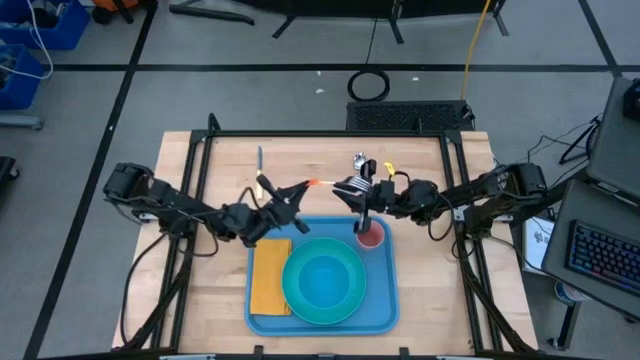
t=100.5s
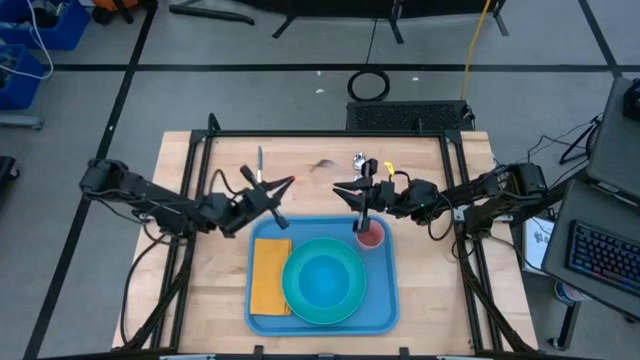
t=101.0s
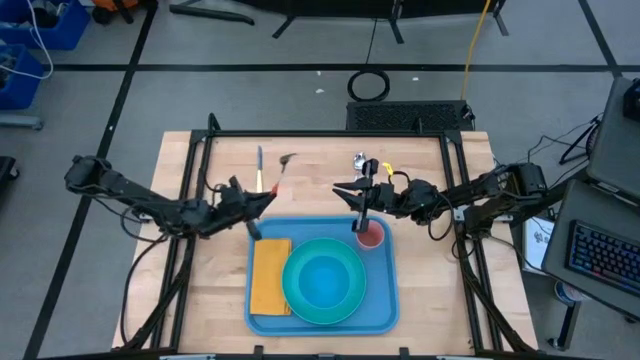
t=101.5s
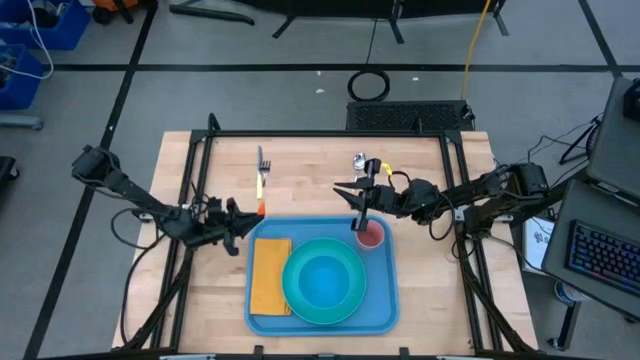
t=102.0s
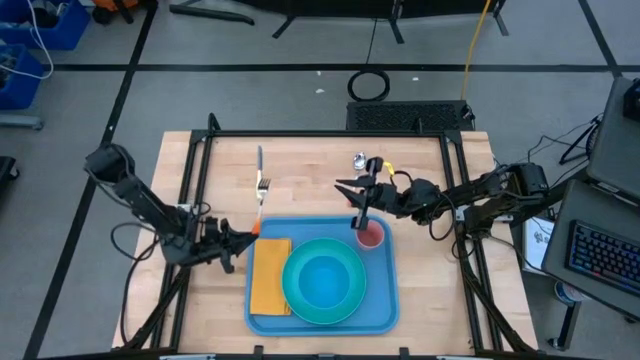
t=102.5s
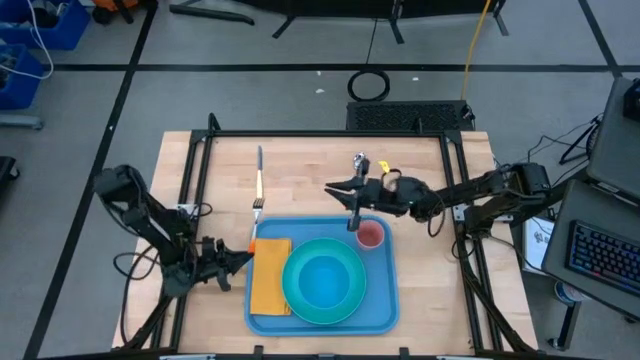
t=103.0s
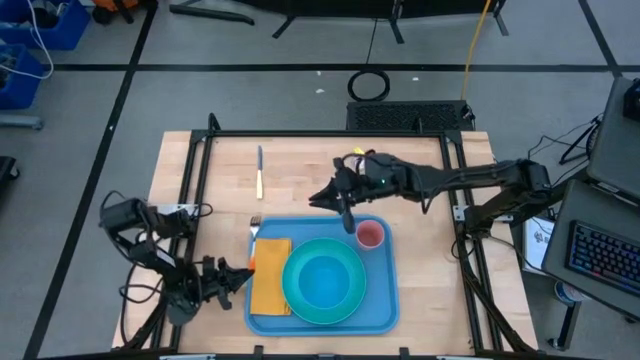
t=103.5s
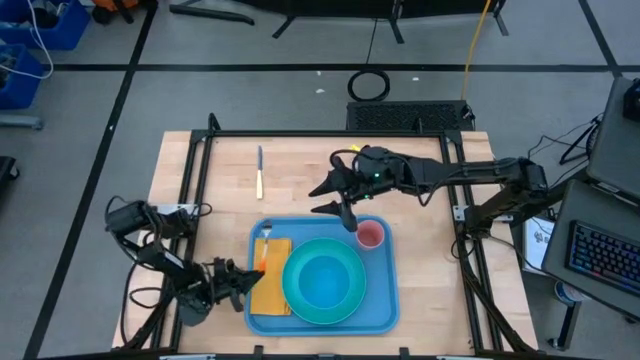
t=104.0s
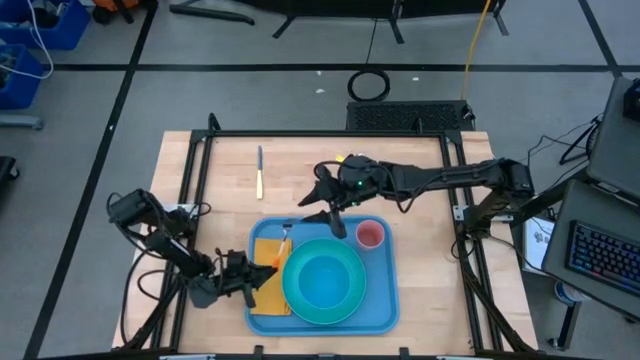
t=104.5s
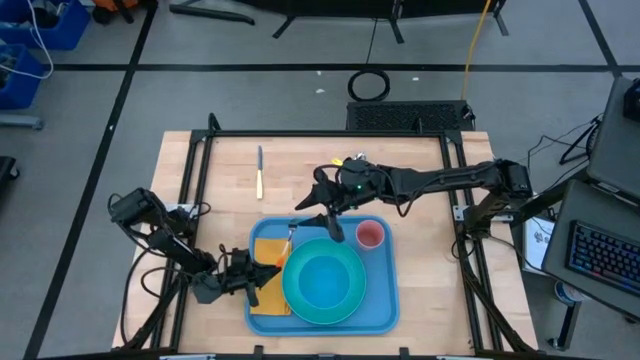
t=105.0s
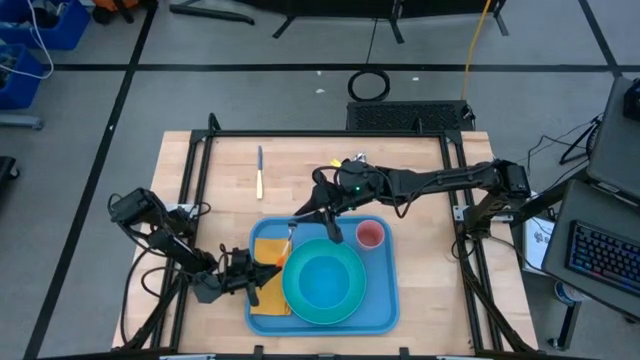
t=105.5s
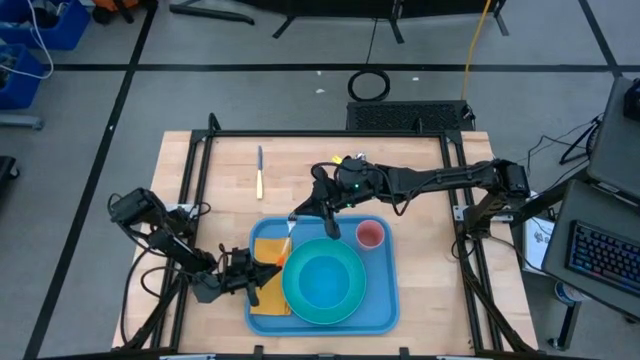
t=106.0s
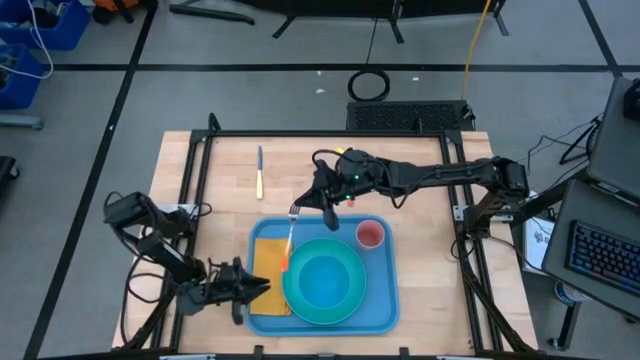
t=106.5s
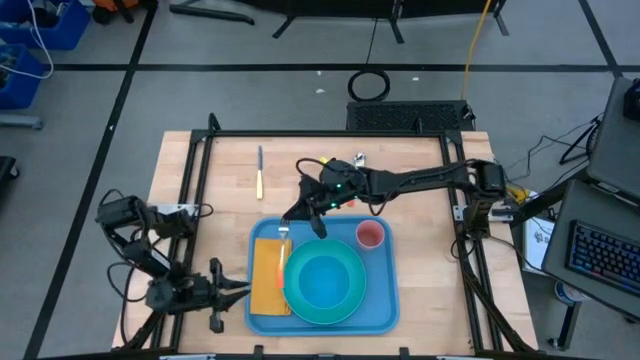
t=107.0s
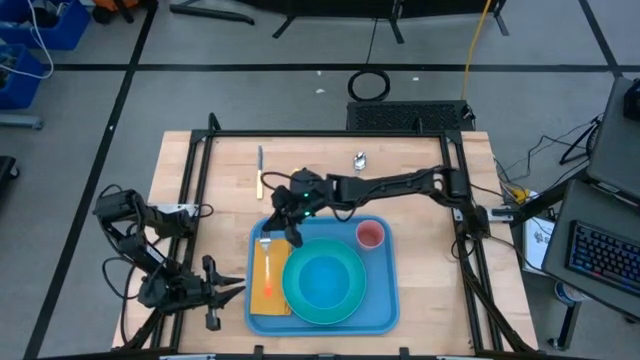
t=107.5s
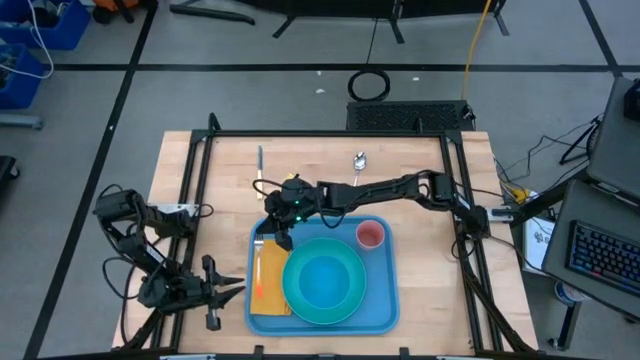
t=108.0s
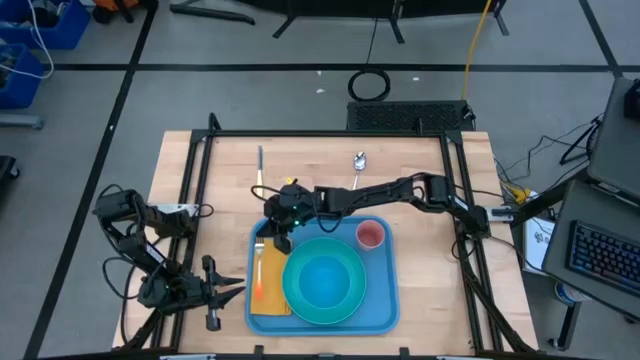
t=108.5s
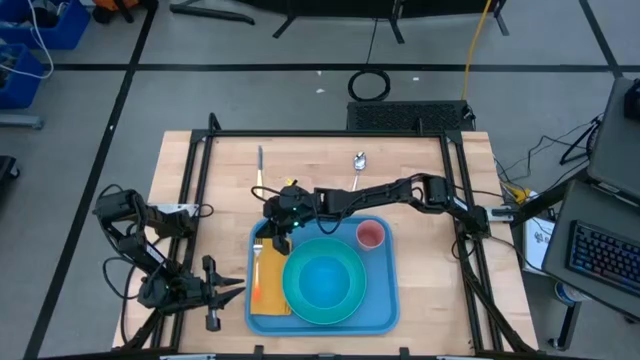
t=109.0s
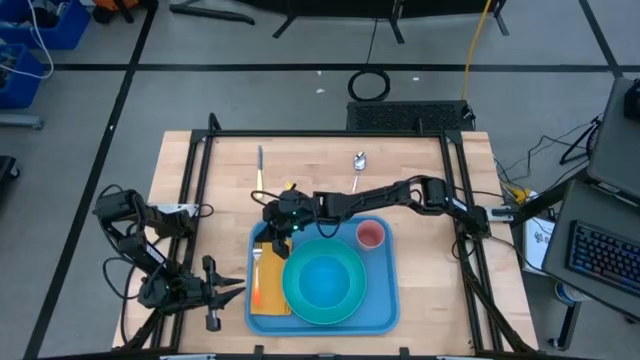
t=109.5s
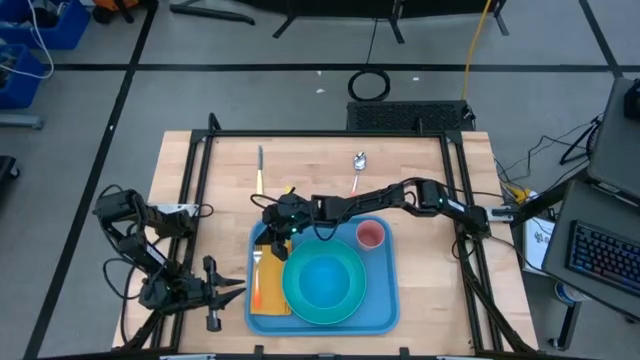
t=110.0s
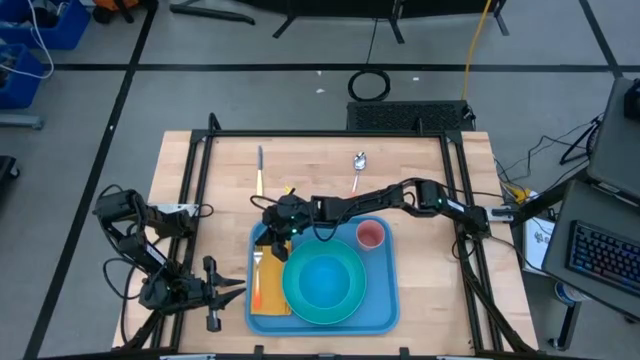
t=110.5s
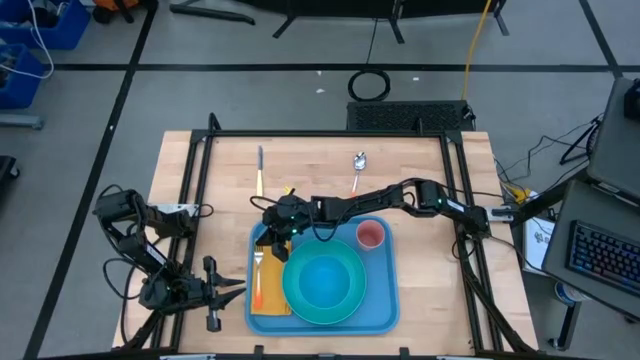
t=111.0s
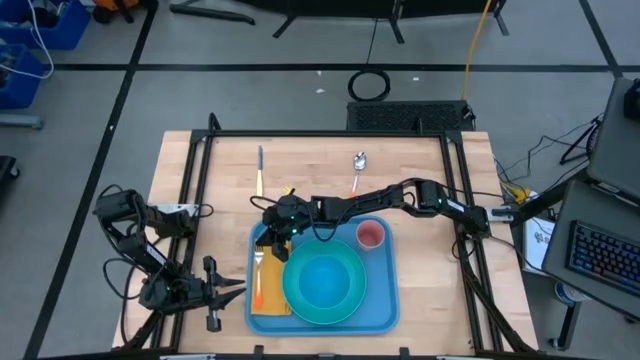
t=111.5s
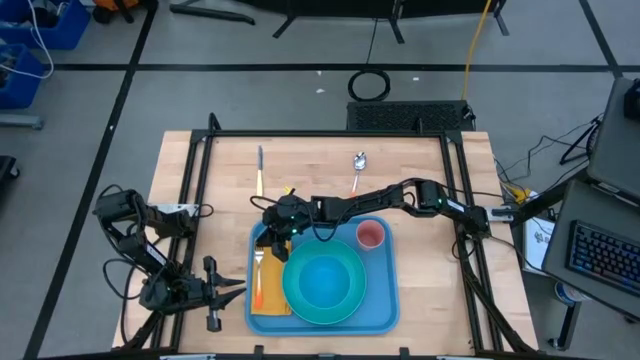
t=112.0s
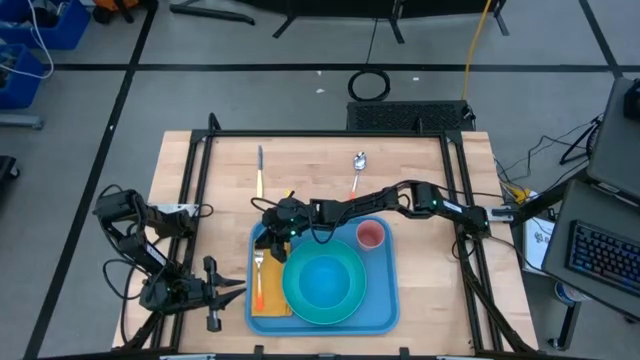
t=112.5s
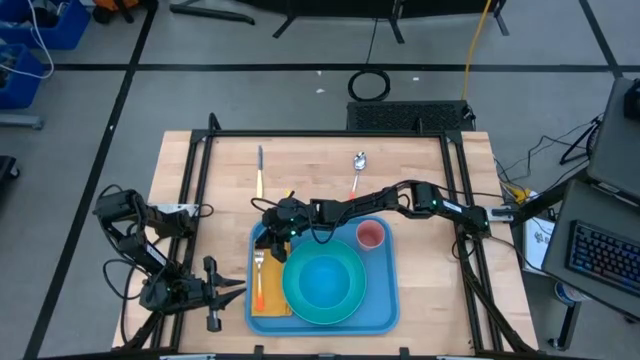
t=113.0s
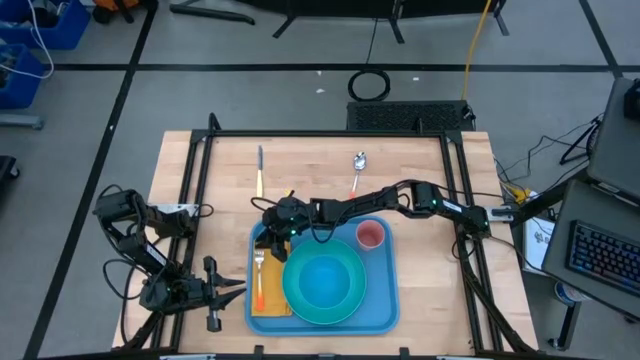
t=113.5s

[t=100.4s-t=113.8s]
Task: Set up tray
Put the orange fork on top of the yellow napkin

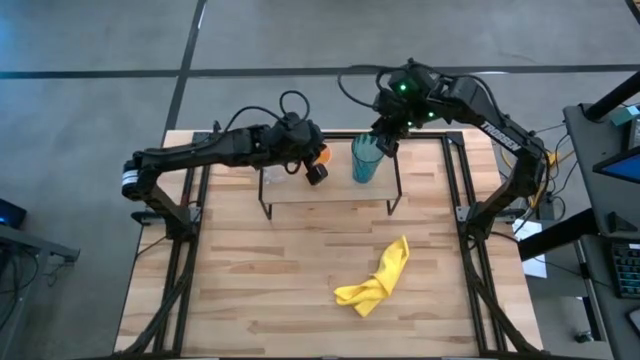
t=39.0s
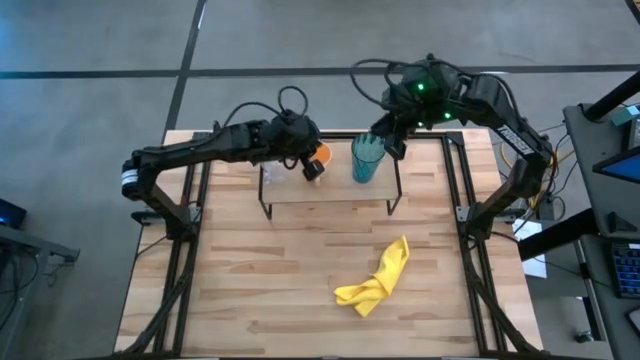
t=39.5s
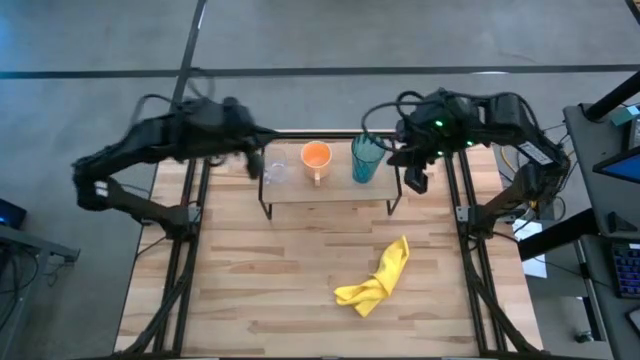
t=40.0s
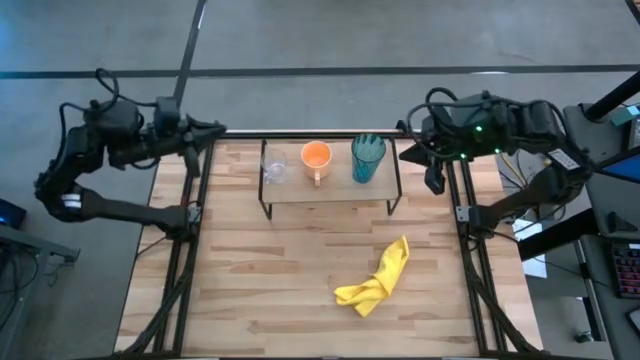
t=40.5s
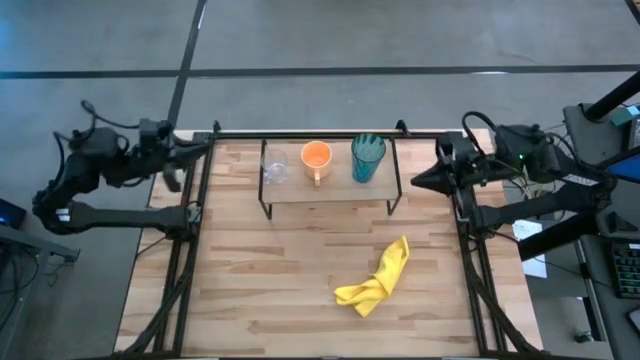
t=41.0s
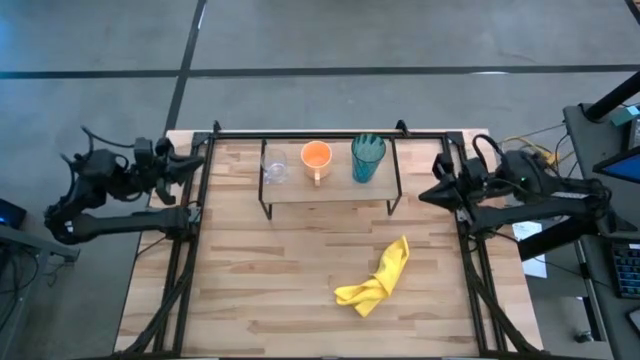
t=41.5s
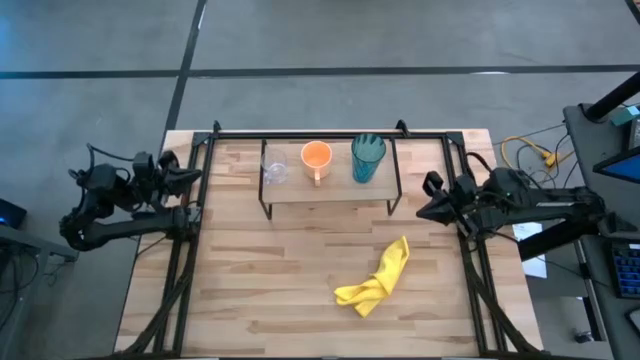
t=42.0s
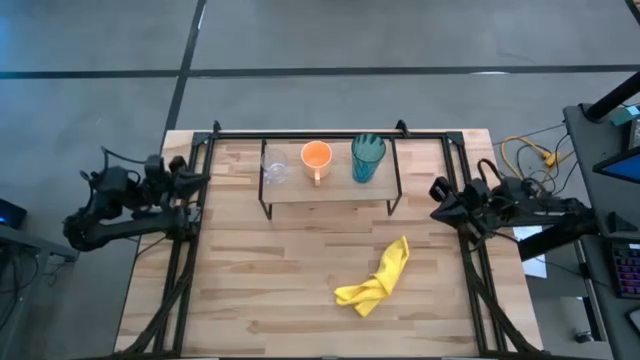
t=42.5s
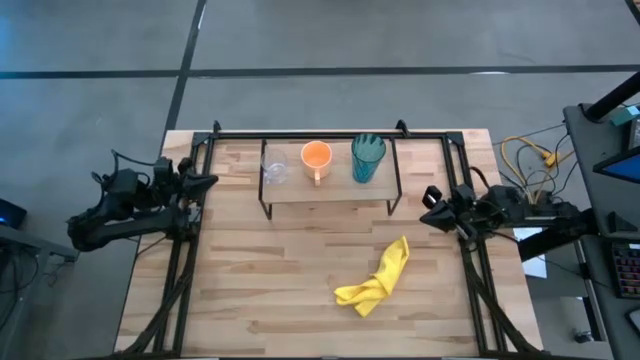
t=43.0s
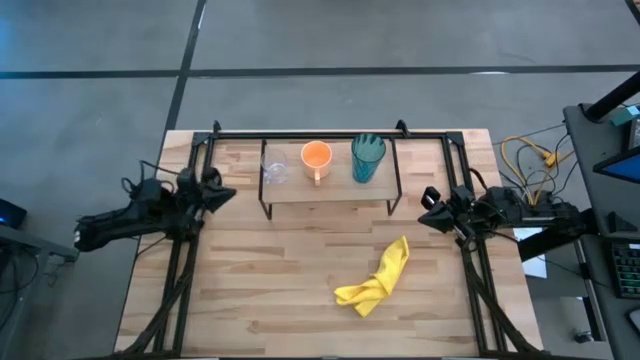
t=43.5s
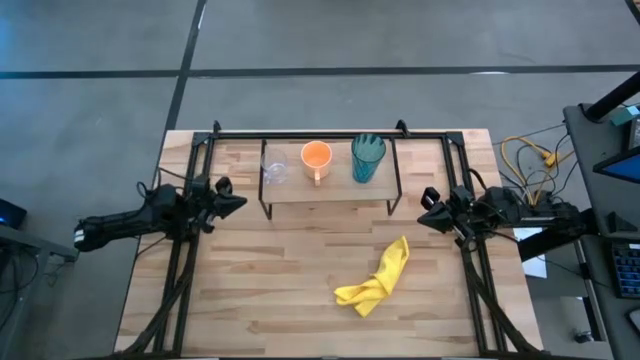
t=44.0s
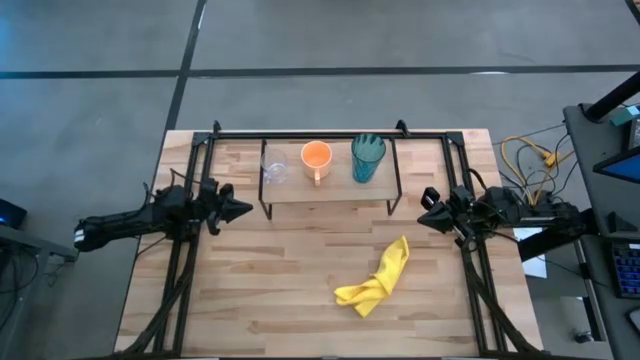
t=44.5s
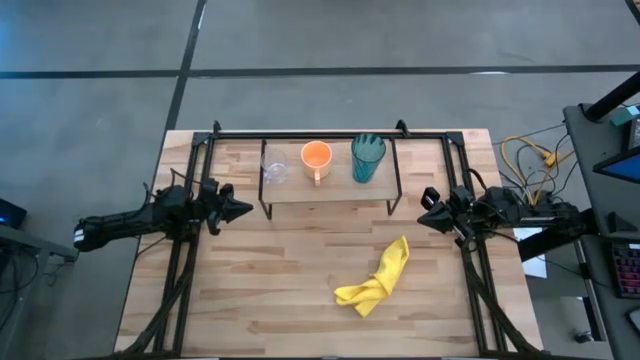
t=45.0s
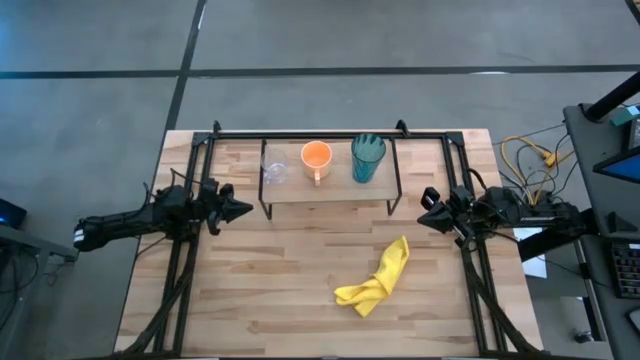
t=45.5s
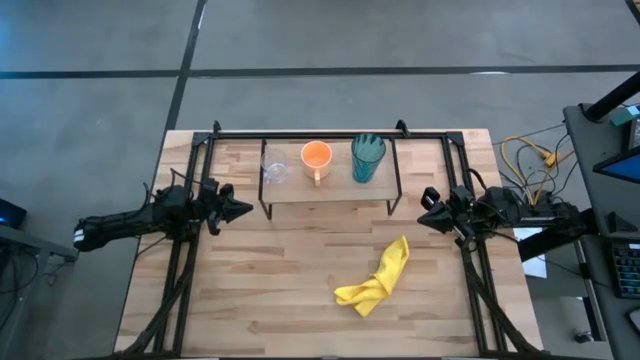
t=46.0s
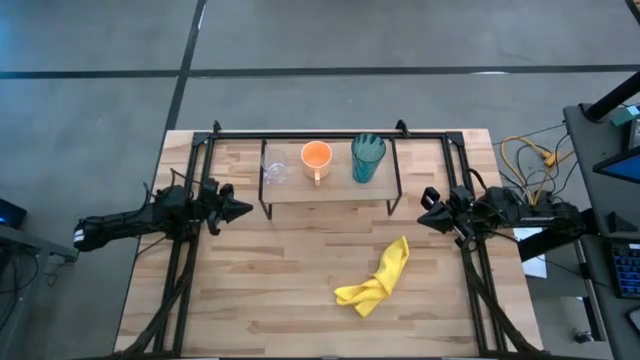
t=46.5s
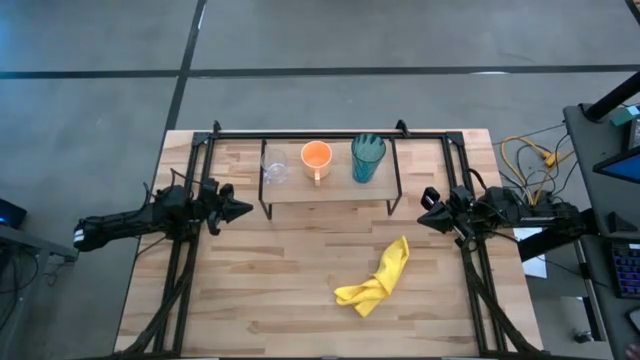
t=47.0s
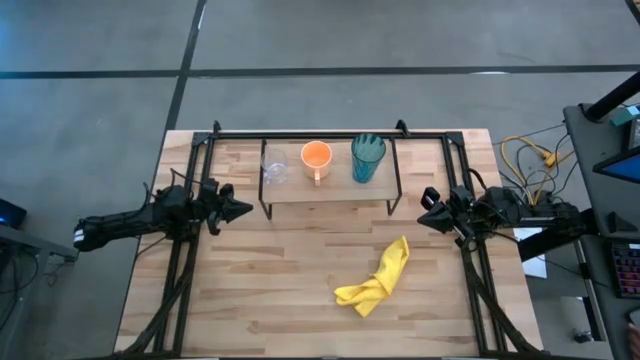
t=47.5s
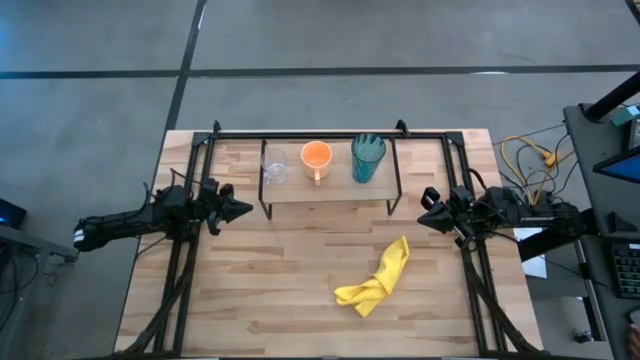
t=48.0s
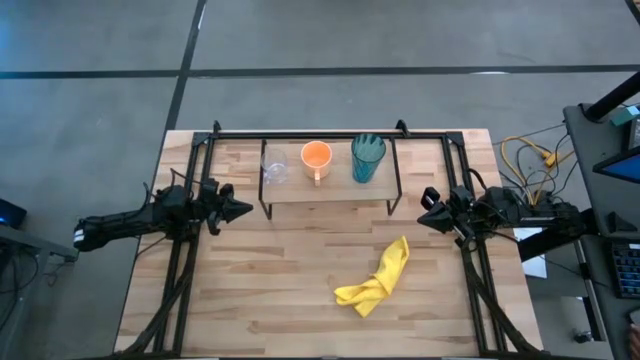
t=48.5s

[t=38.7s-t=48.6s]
Task: Stack small to large cups/mugs on shelf
Return to Home Position
